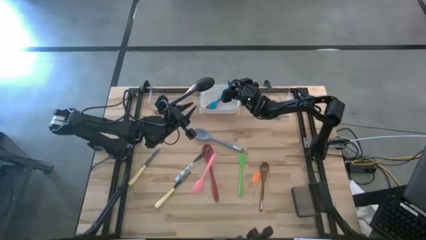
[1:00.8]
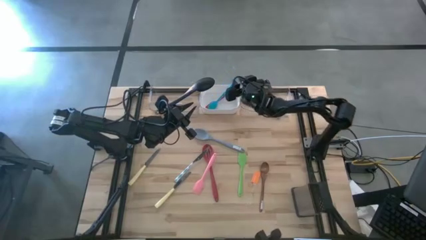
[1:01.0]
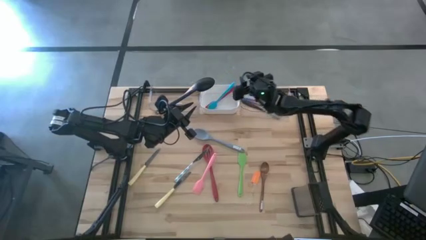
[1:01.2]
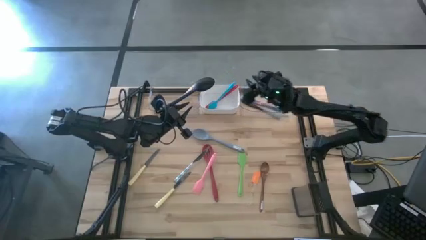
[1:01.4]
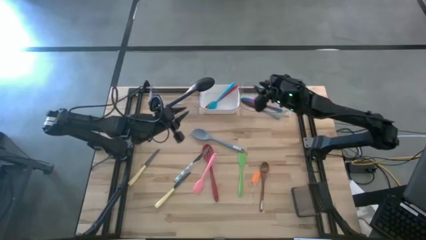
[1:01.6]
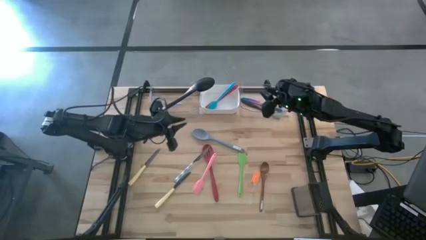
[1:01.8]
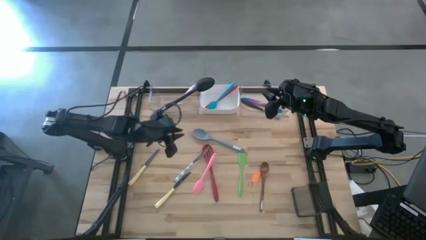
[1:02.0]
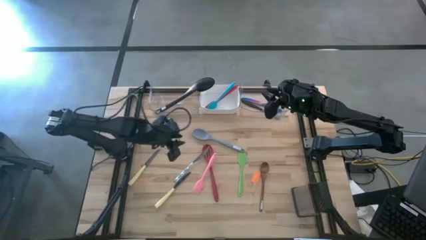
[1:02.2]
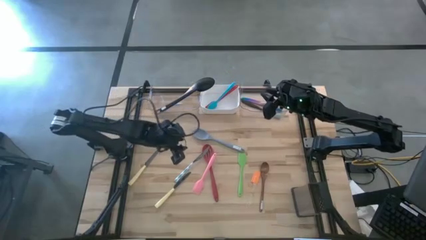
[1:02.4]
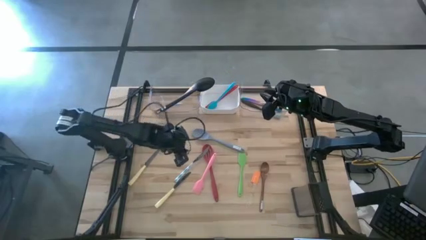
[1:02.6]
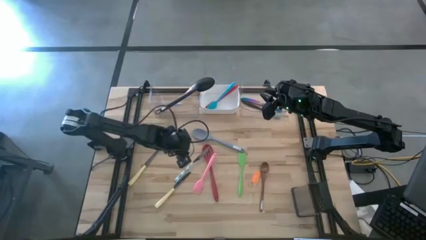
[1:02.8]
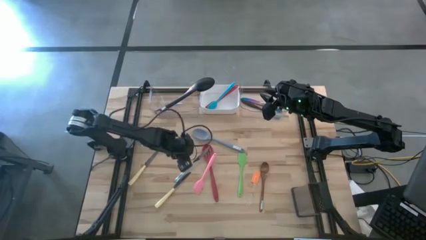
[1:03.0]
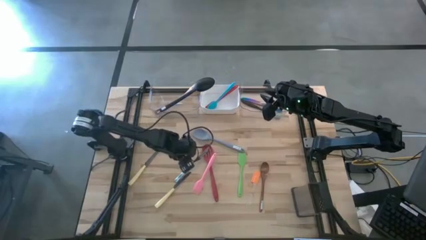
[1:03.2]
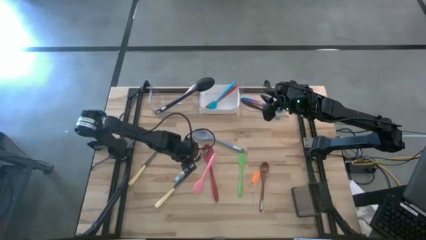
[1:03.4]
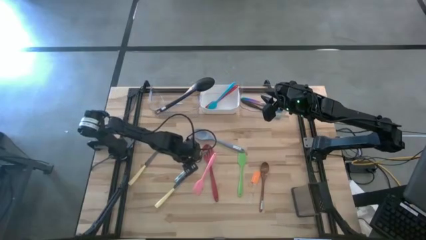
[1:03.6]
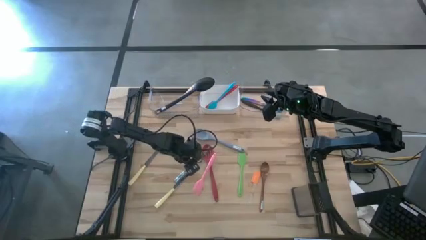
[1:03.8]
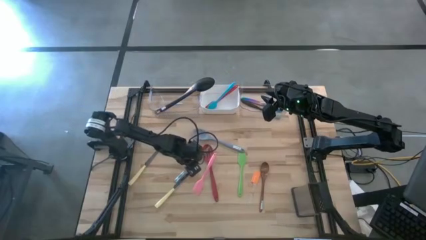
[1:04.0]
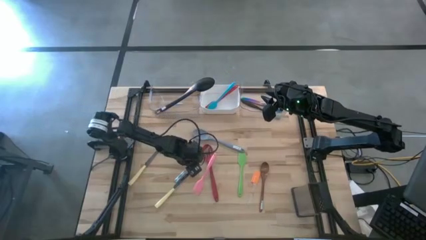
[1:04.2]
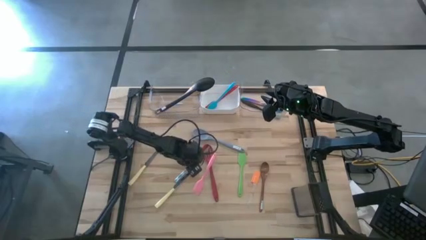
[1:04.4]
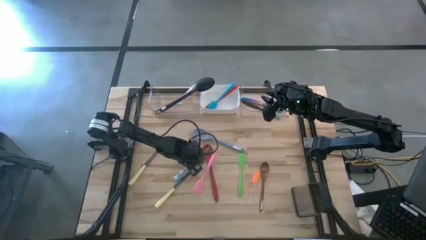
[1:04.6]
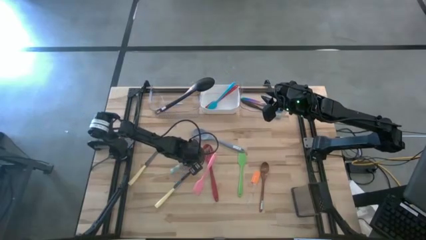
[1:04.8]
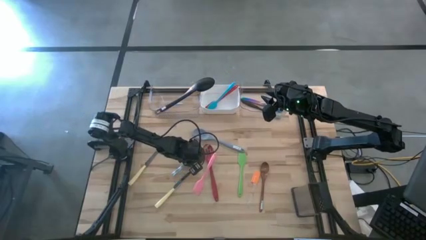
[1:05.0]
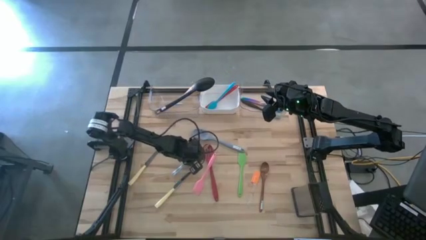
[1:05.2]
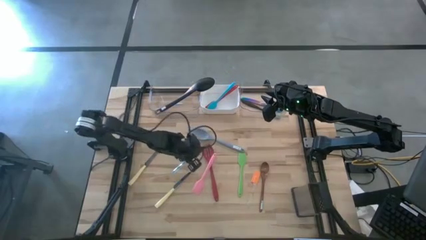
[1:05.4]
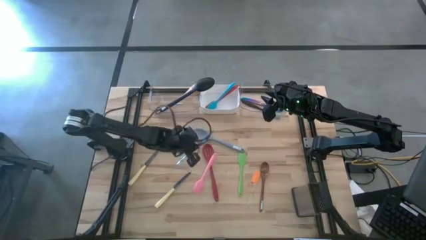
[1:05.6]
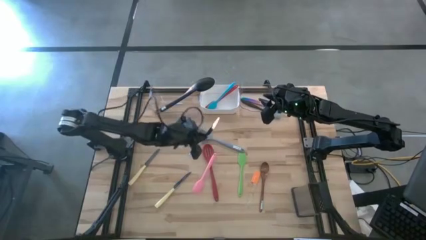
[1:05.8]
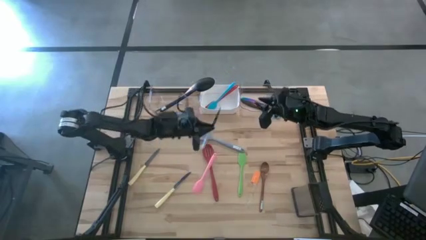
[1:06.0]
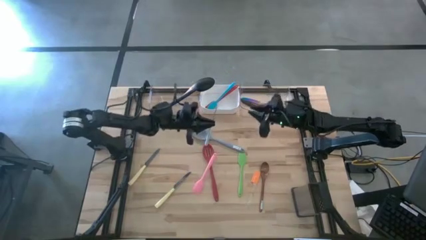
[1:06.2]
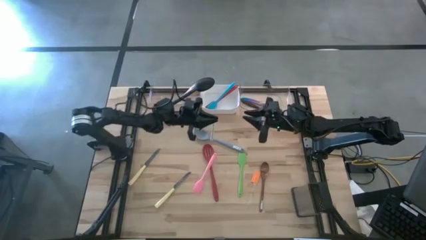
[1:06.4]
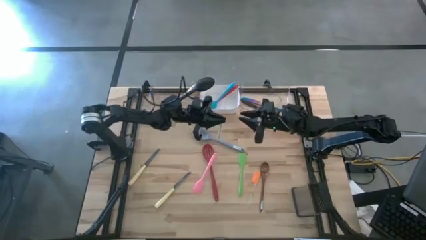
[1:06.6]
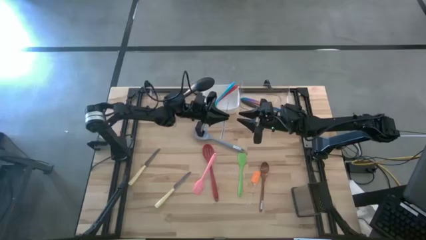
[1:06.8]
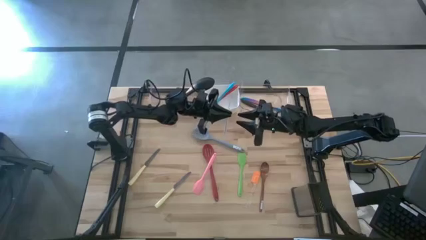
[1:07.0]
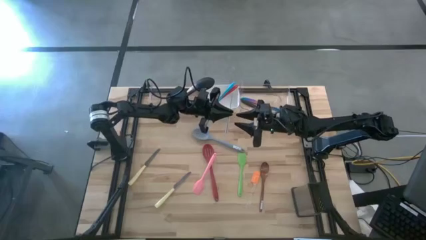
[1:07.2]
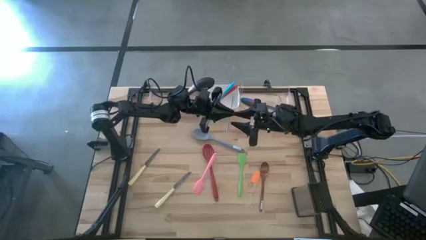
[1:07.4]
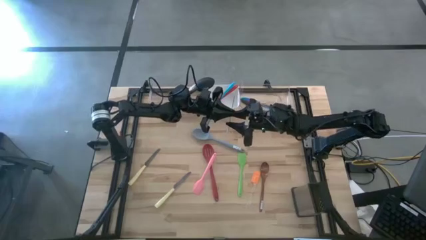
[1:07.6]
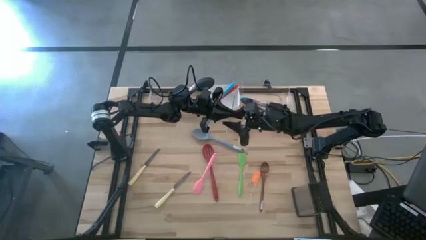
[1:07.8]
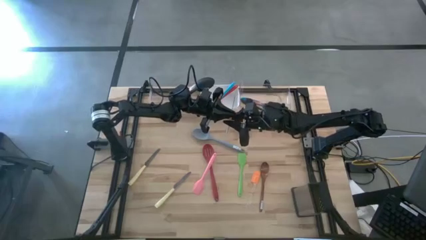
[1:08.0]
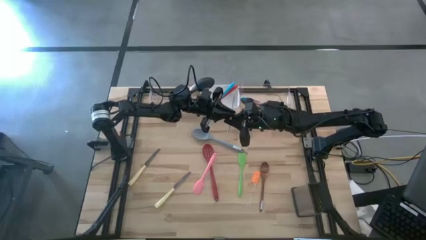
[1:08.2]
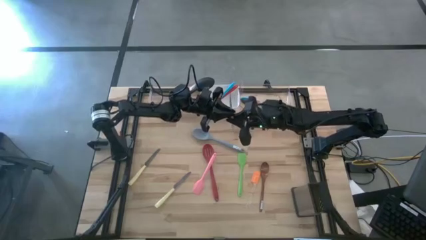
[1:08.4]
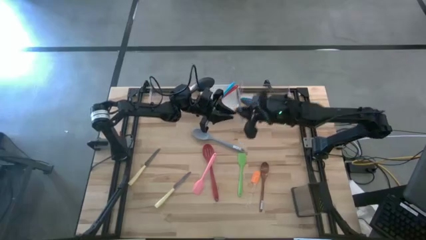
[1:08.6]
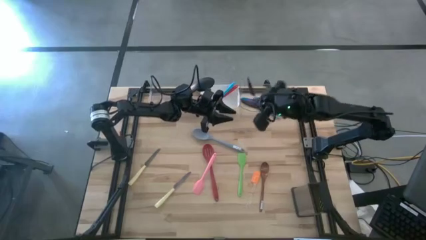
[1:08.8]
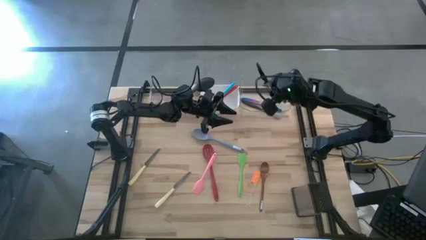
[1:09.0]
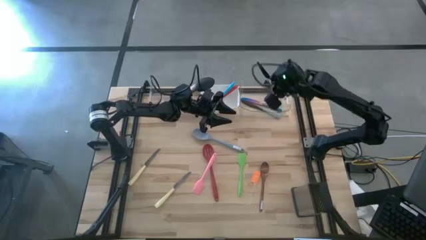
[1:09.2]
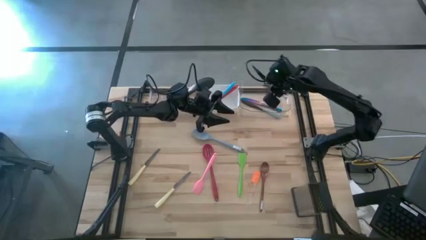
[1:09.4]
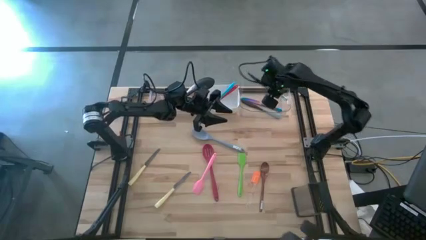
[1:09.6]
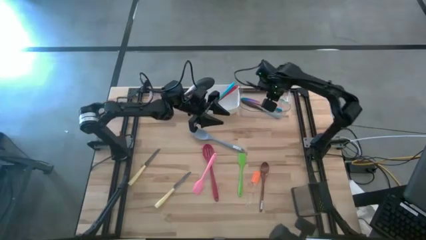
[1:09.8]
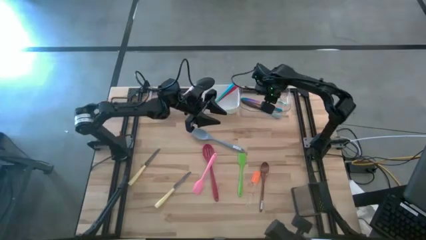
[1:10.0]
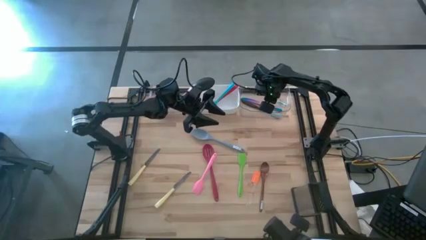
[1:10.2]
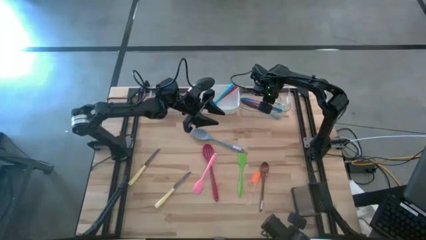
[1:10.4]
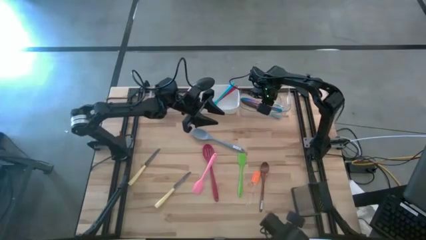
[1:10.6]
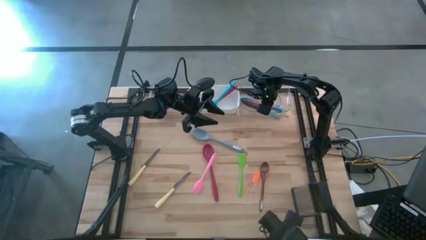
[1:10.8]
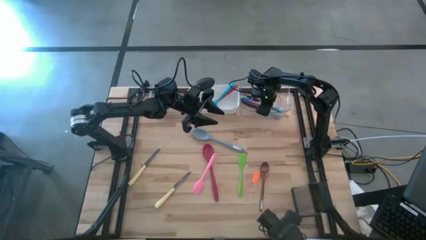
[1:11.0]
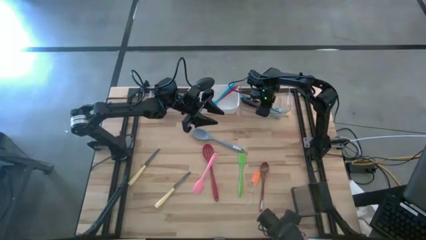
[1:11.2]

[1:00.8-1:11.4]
Task: Pick & Place Kitchen Items
Put the white pattern table knife into the right transparent bin

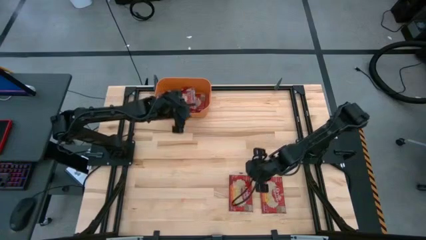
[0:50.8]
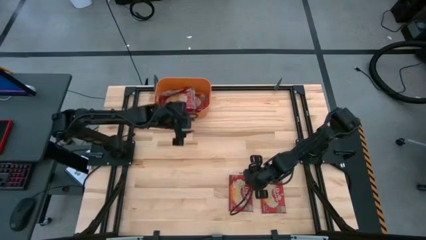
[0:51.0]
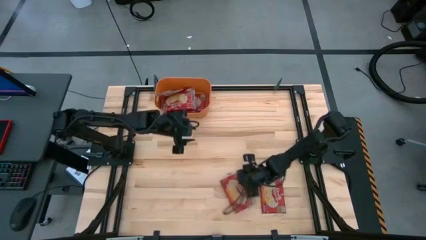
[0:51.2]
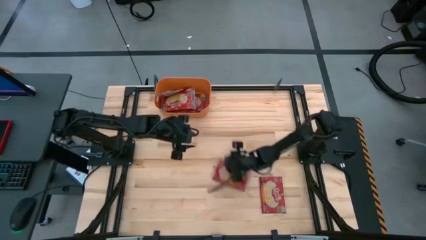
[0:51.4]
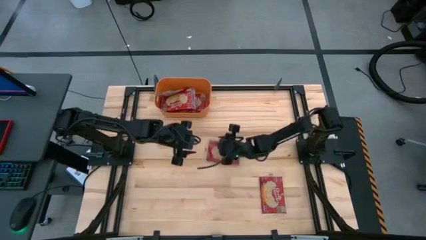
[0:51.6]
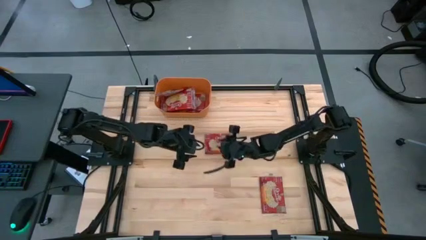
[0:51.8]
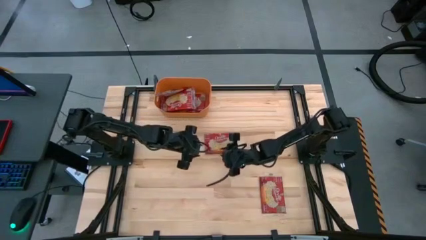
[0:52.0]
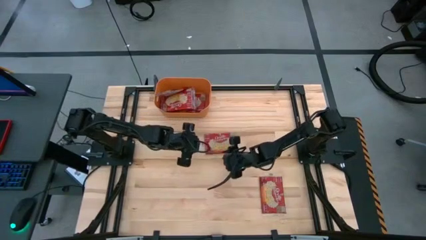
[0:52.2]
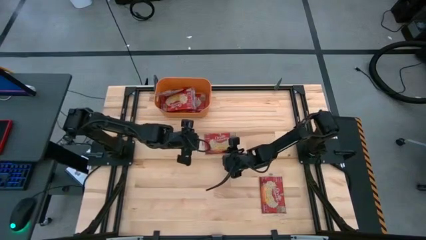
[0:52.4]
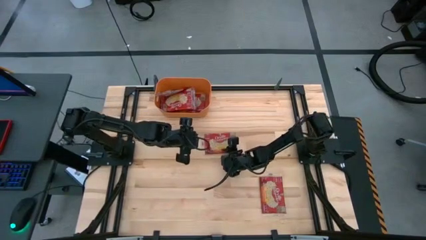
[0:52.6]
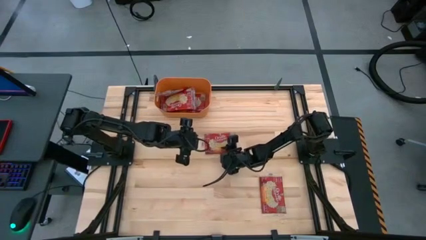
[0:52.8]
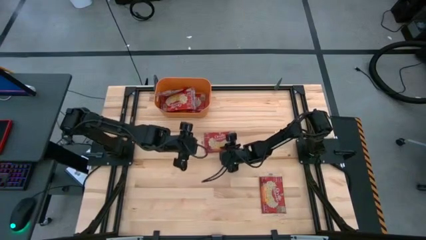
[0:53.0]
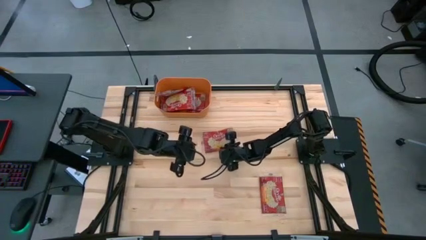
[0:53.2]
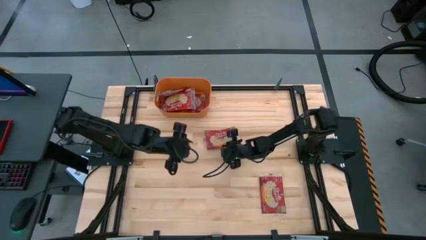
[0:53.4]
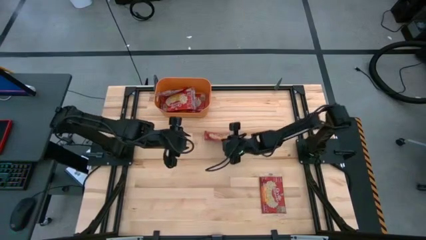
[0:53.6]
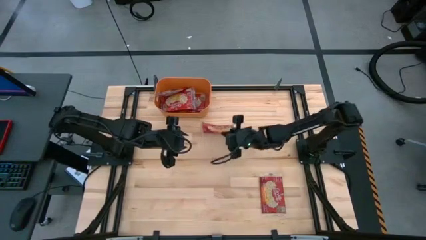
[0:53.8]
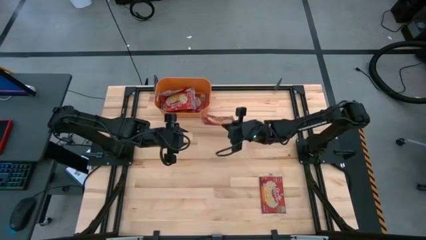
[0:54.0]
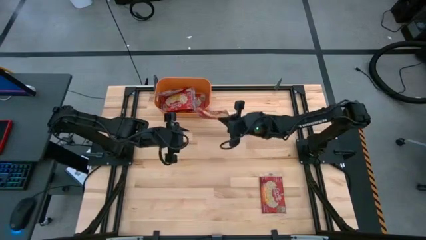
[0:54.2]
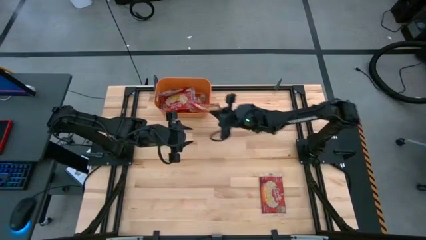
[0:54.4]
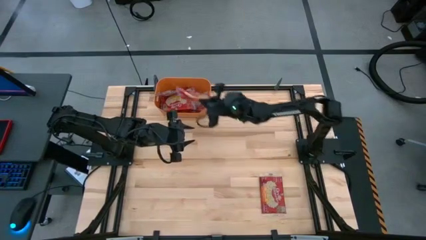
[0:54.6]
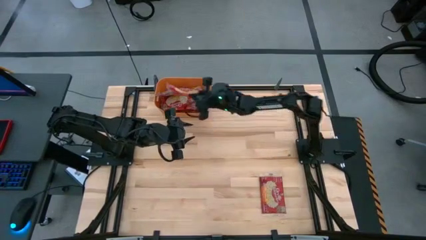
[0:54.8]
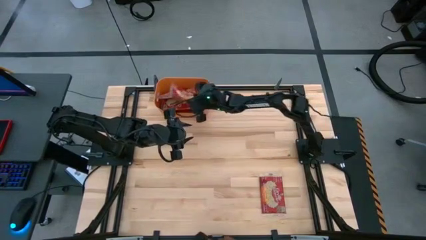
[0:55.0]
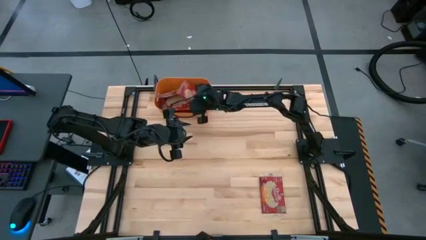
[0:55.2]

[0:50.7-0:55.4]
Task: Sort popcorn bags into baskets
Put the popcorn bag into the orange bin

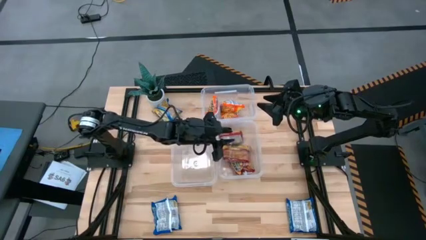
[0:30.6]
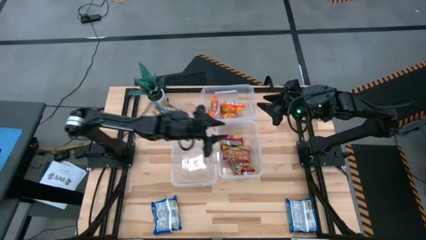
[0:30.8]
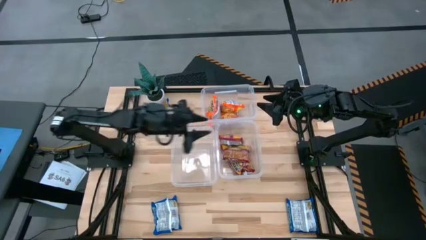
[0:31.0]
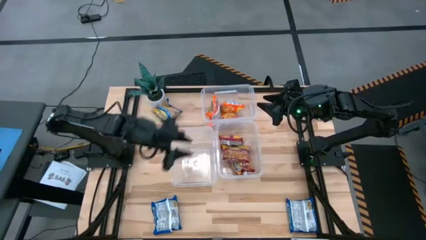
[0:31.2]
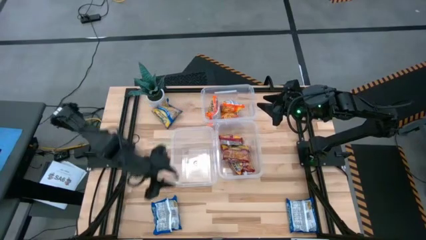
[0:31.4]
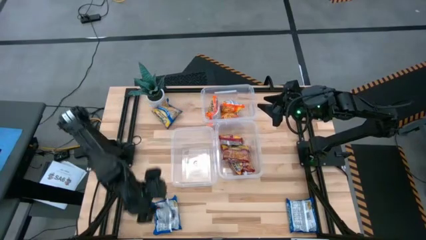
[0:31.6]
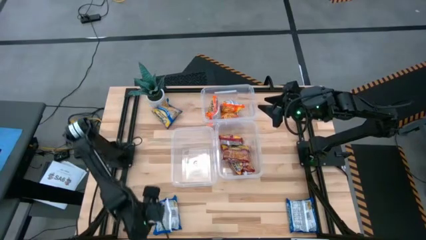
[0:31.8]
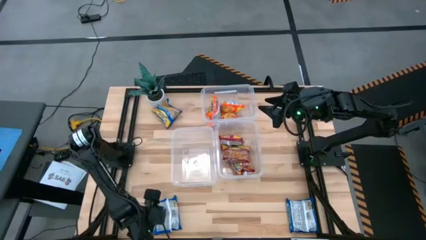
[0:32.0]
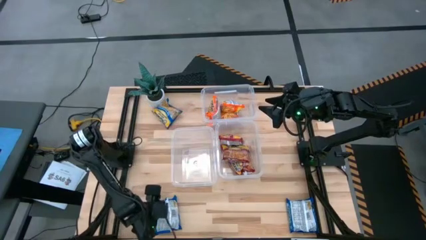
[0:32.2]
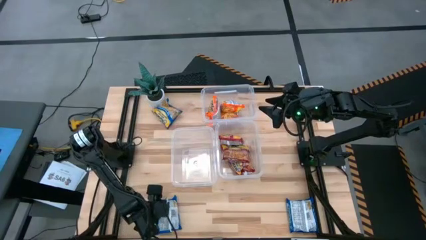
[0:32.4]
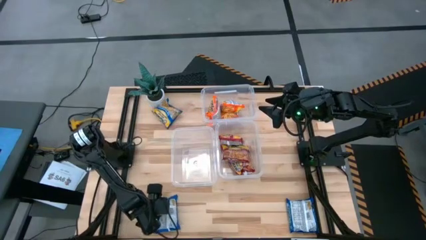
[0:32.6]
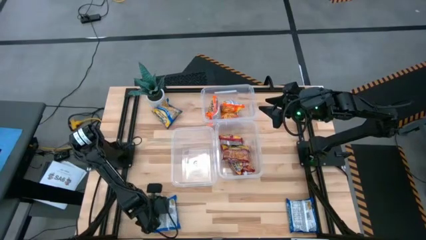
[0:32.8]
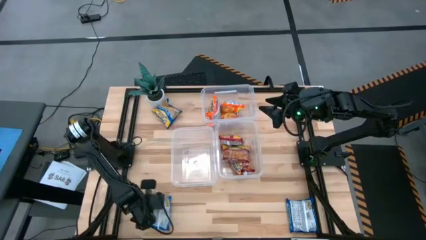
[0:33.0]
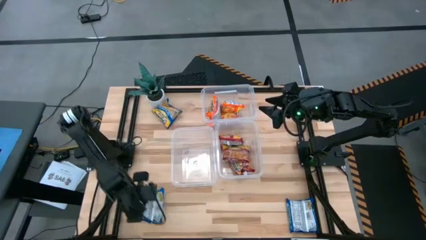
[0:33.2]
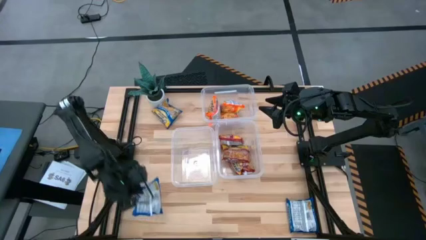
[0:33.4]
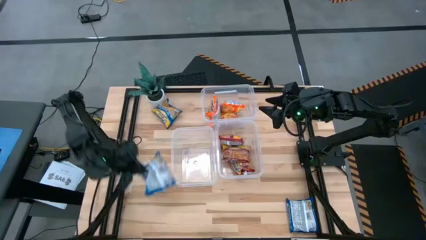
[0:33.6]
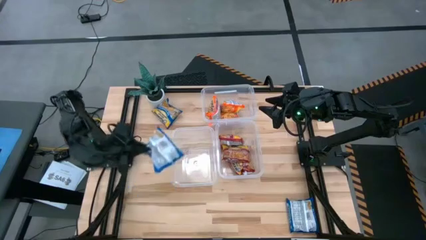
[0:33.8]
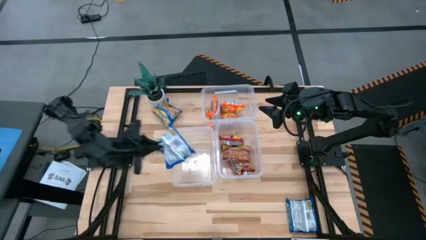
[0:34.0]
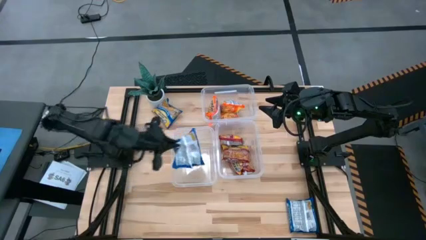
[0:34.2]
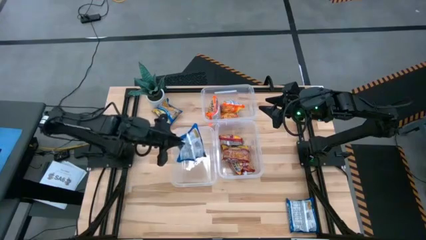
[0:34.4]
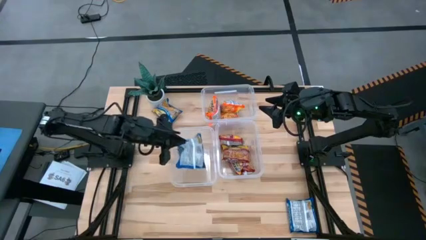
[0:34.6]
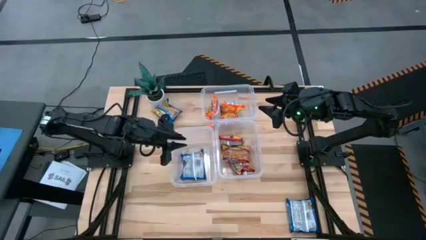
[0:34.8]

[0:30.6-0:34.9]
Task: Sort Maruchan noodles
Put the bottom left blue noodle pack into the bottom left transparent bin
